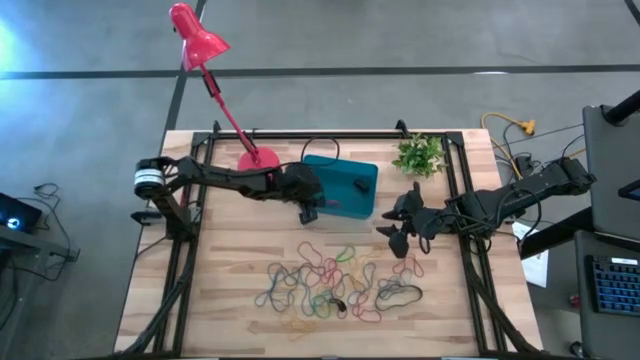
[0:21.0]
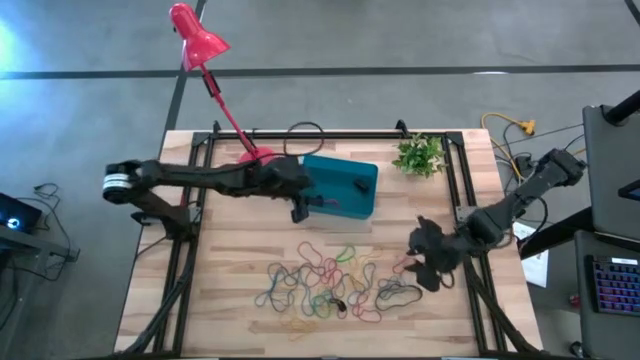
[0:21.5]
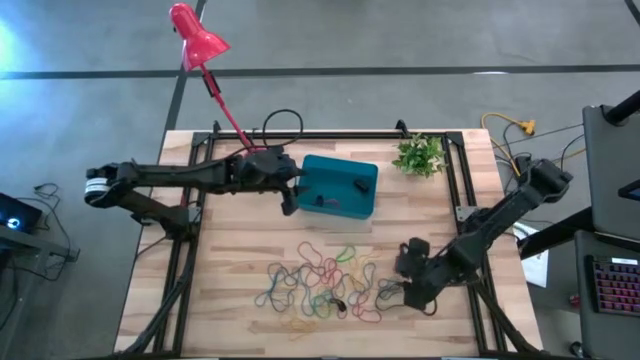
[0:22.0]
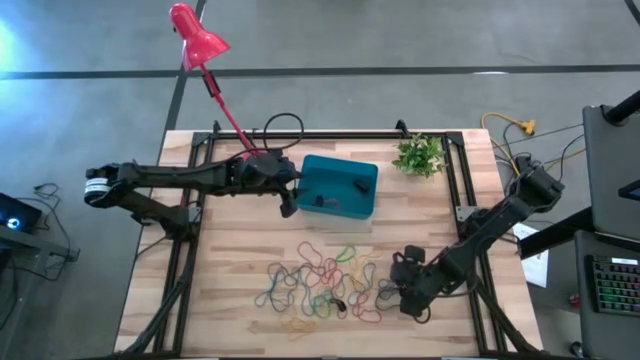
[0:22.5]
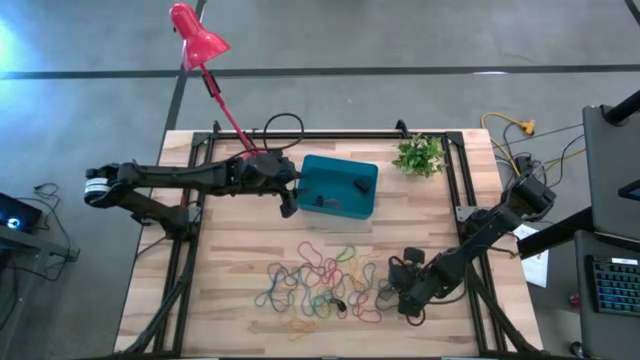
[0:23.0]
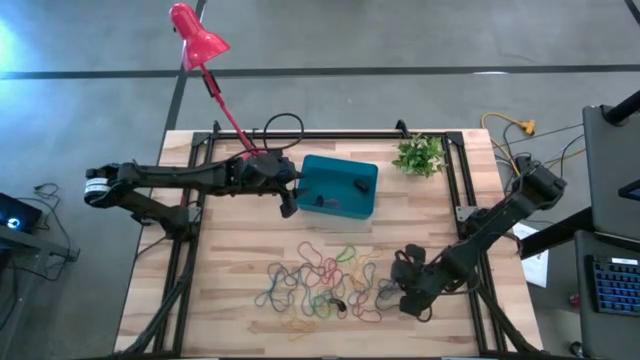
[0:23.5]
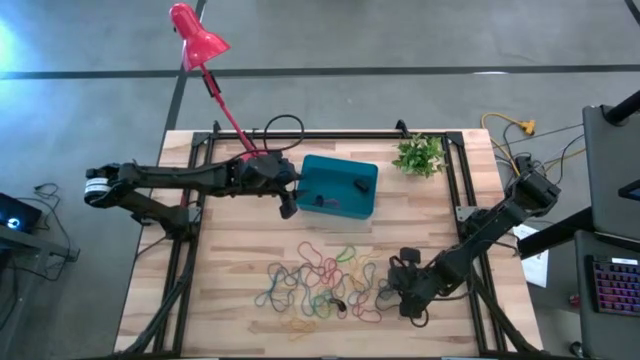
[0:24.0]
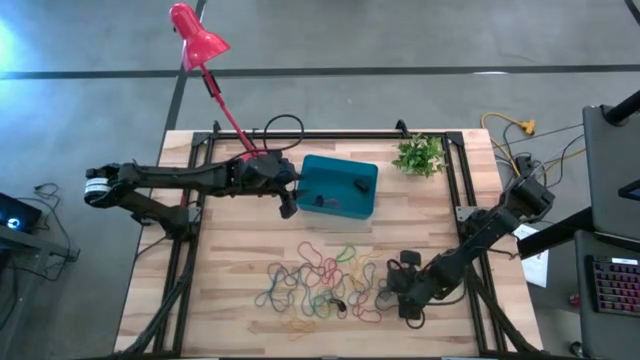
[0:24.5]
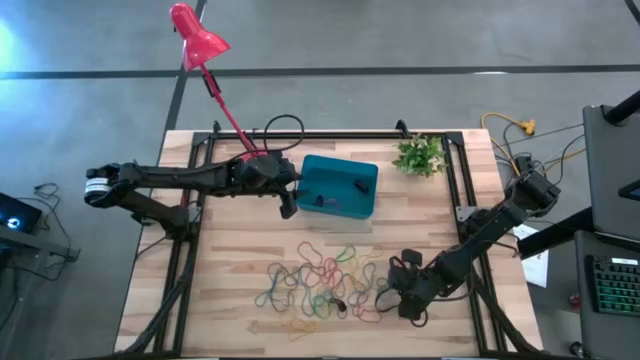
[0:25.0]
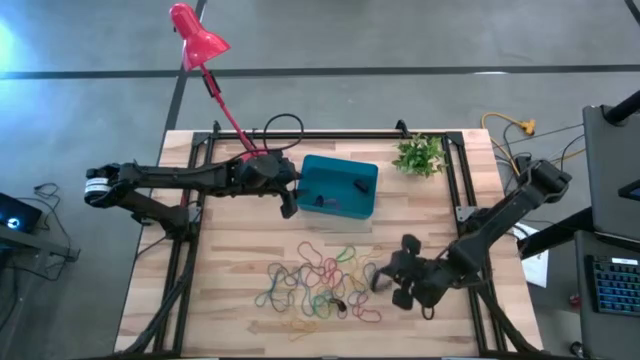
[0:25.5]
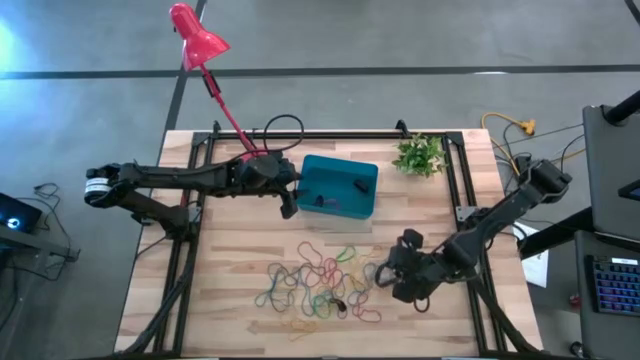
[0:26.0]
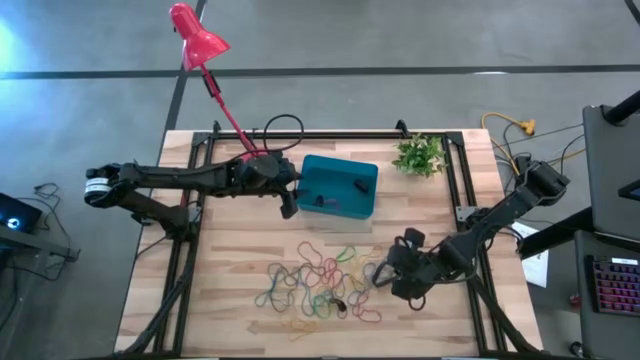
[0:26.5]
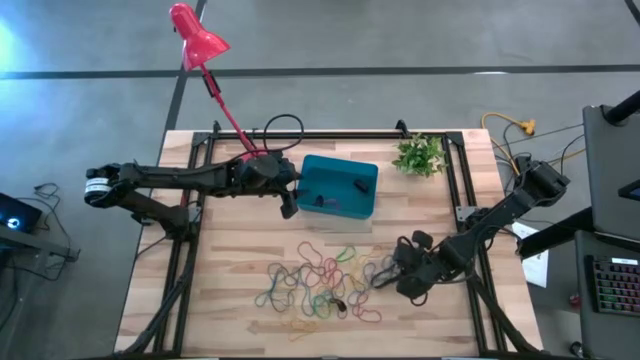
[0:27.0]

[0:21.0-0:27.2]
Task: Pick and place rubber bands into bin
Put the black rubber band into the blue bin

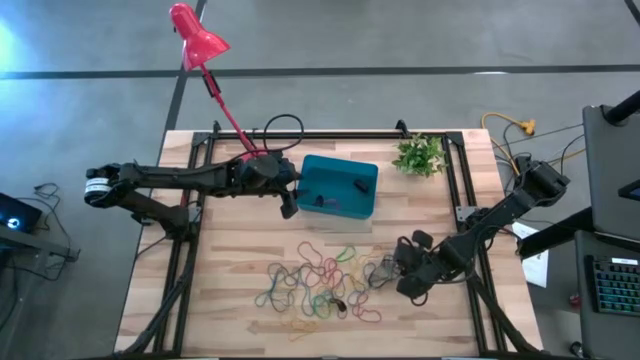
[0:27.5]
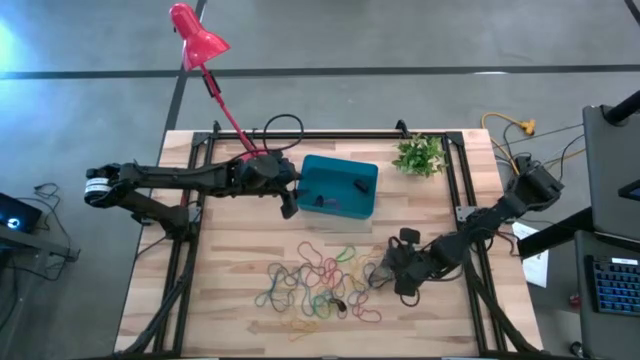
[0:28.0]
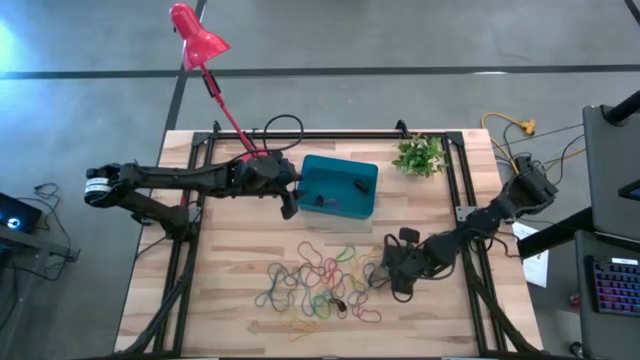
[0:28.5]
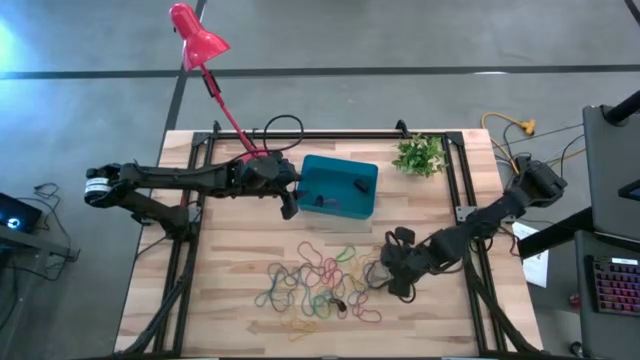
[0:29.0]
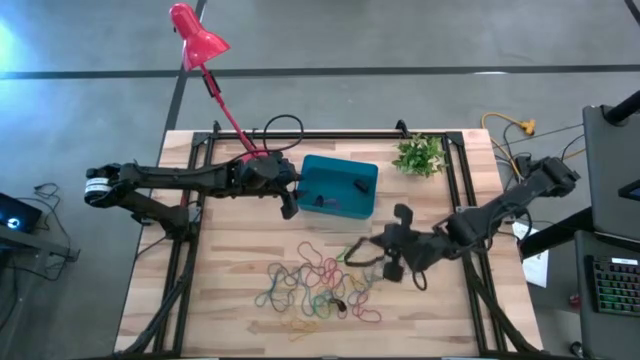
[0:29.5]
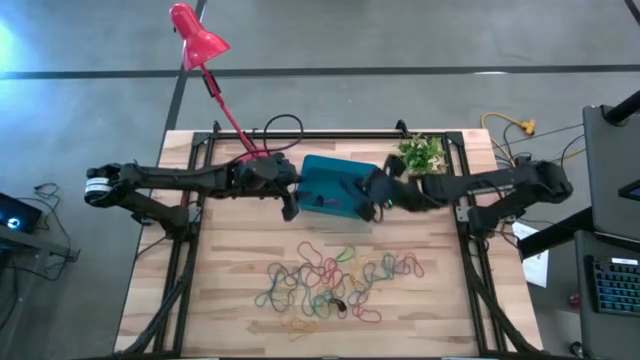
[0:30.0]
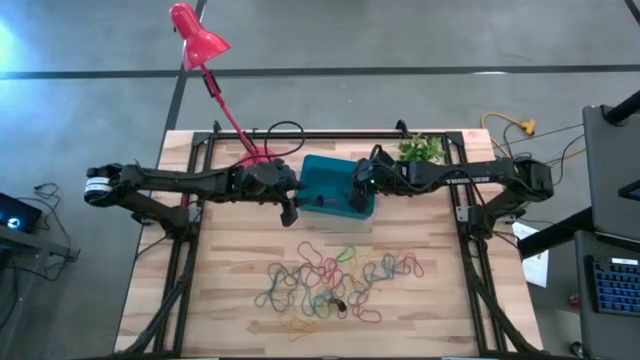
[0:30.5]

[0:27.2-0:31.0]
Put the black rubber band into the blue bin

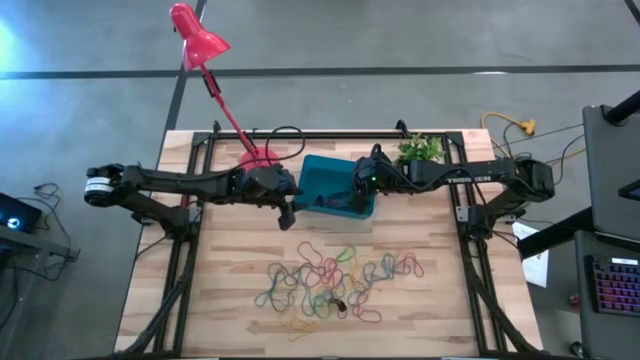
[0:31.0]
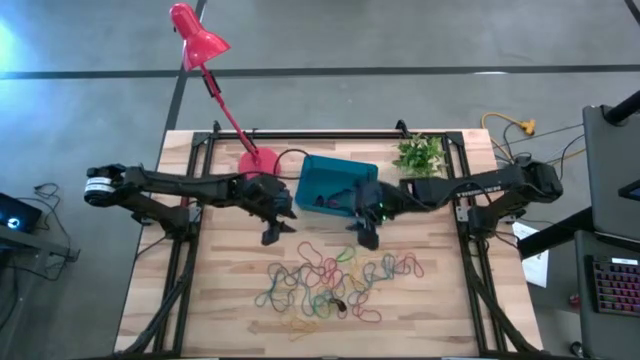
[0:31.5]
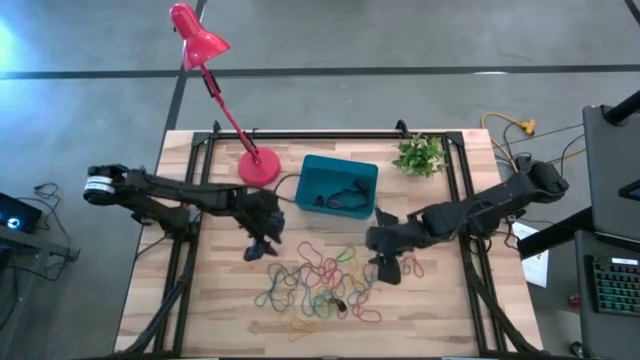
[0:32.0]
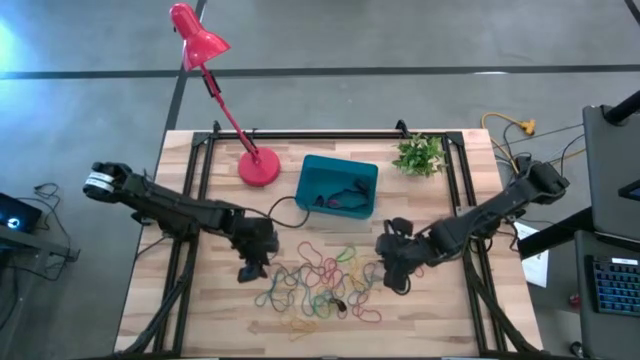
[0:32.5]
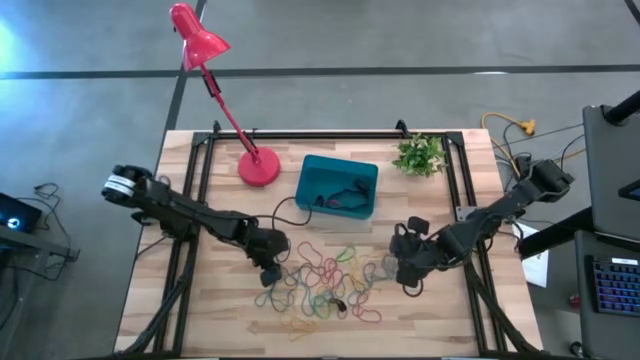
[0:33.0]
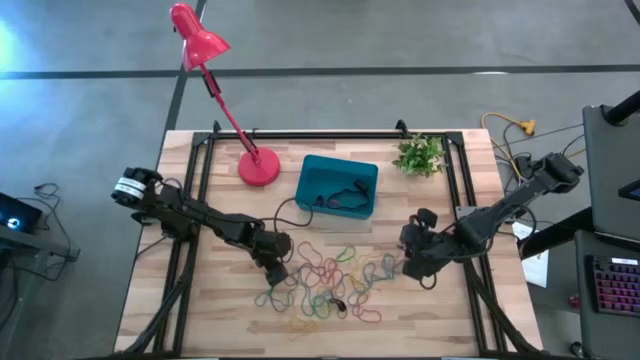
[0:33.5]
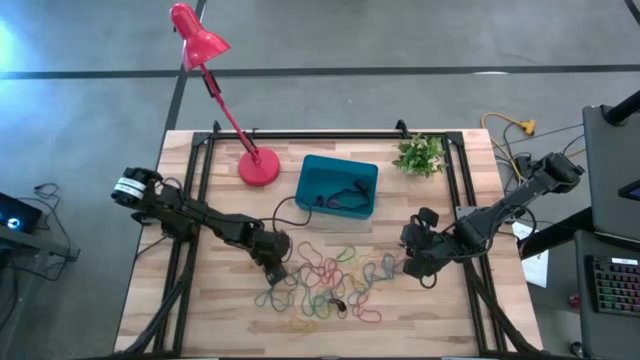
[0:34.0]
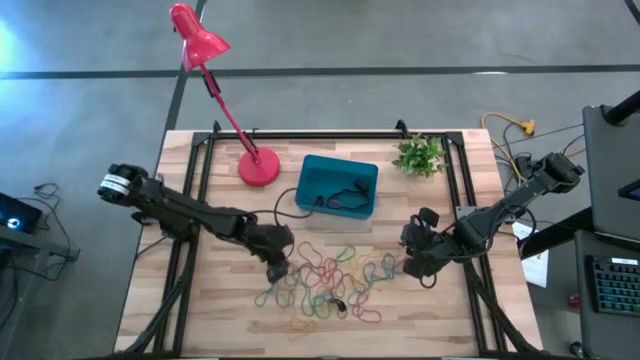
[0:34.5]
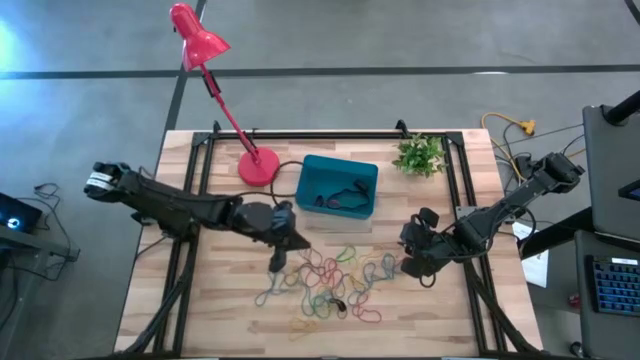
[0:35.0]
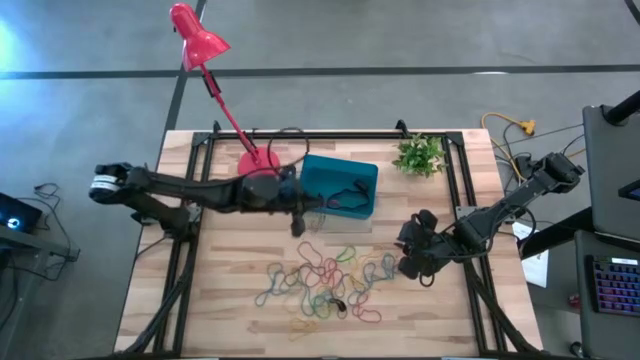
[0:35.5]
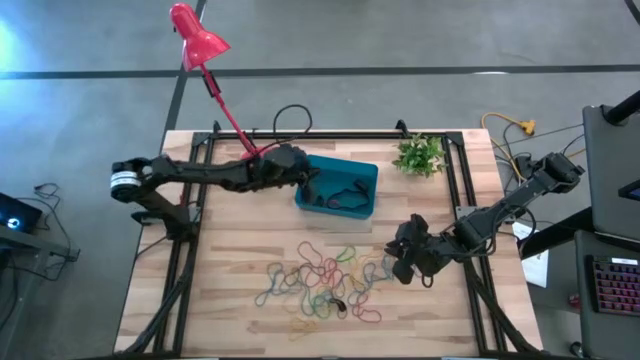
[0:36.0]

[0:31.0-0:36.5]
Put the purple rubber band into the blue bin

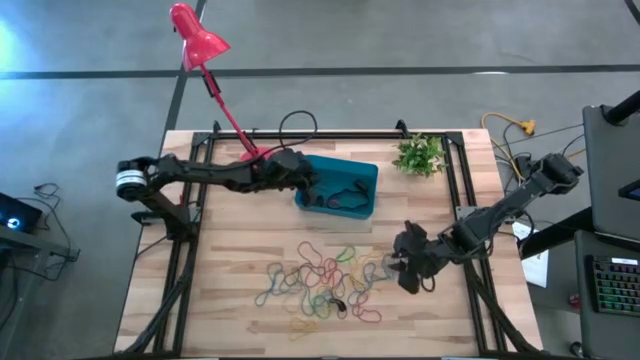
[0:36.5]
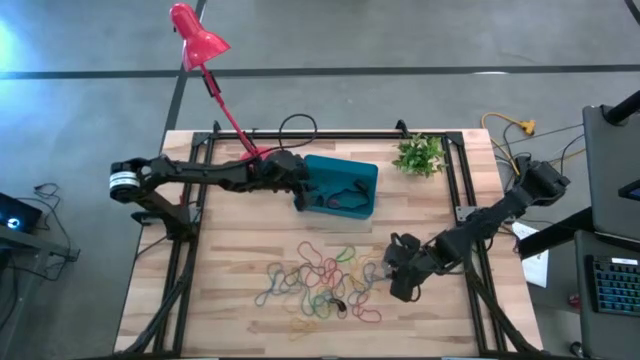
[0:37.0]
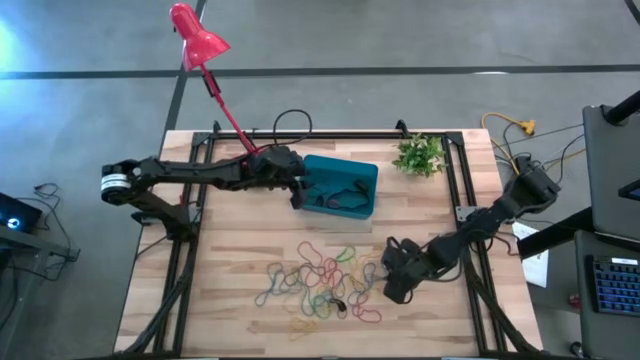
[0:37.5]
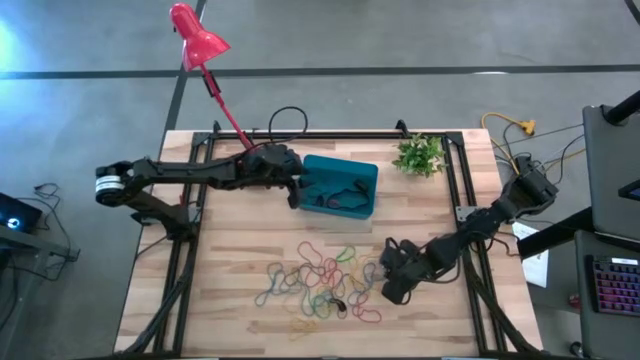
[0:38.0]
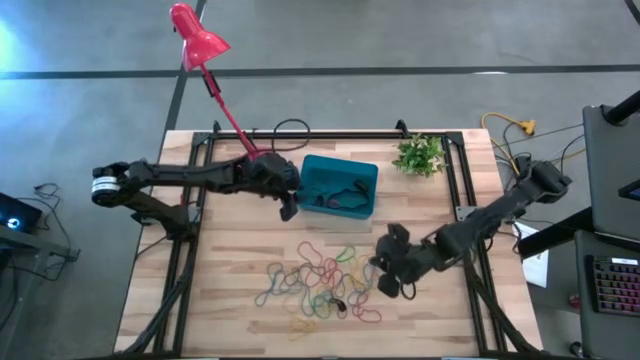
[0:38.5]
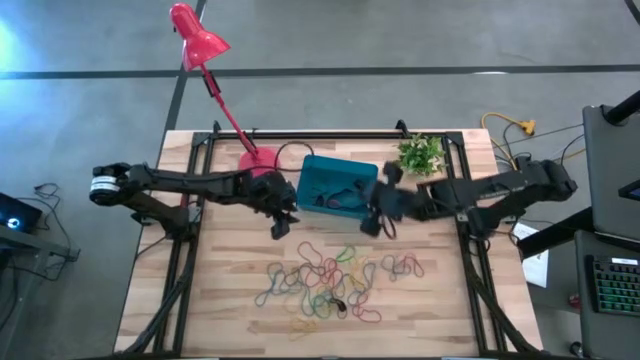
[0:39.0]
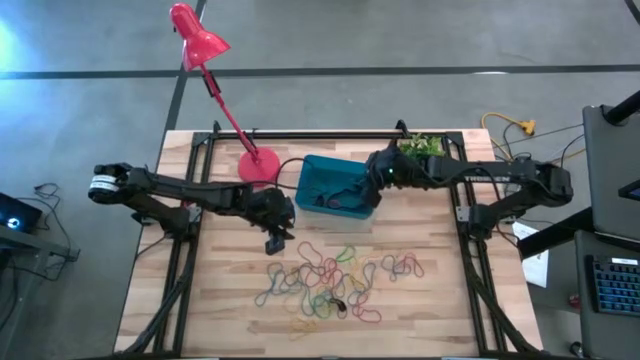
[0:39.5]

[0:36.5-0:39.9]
Put the blue rubber band into the blue bin

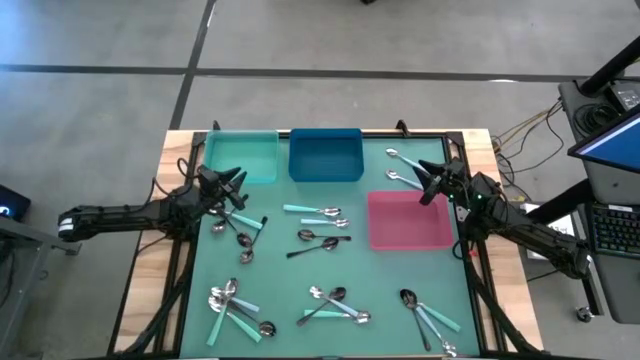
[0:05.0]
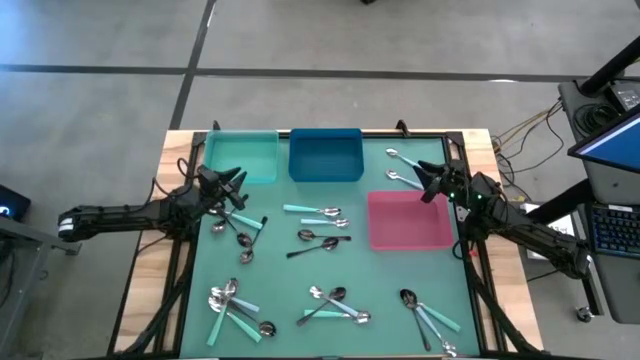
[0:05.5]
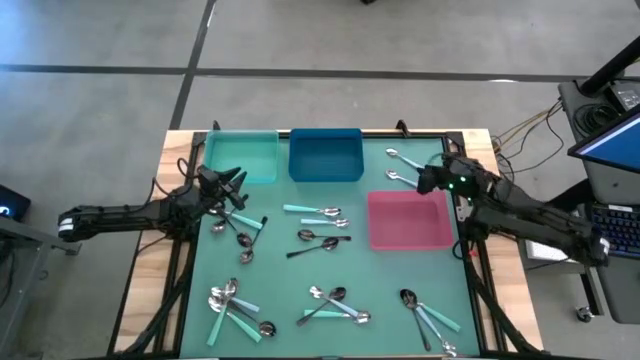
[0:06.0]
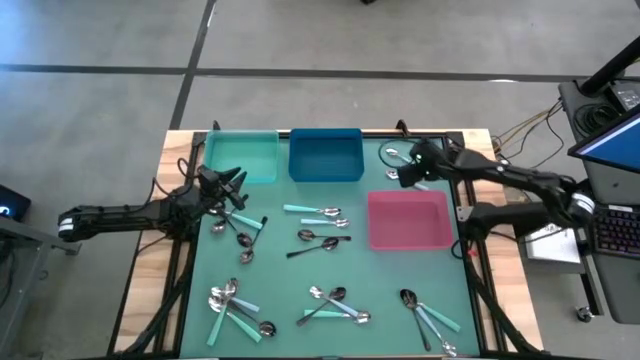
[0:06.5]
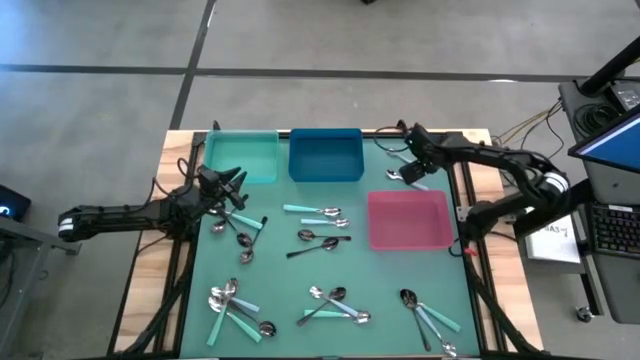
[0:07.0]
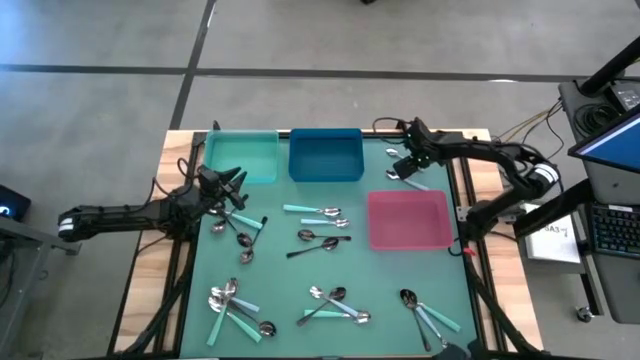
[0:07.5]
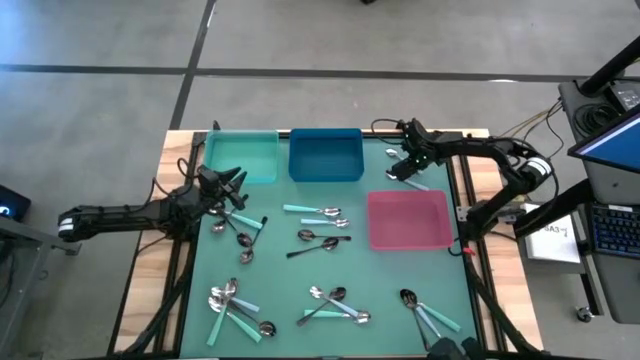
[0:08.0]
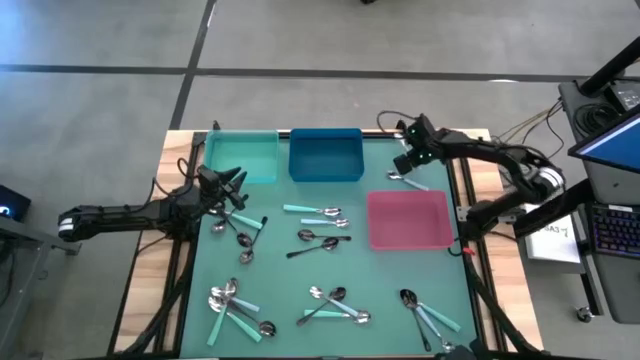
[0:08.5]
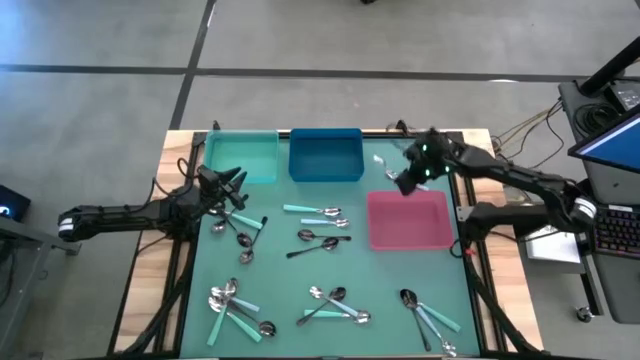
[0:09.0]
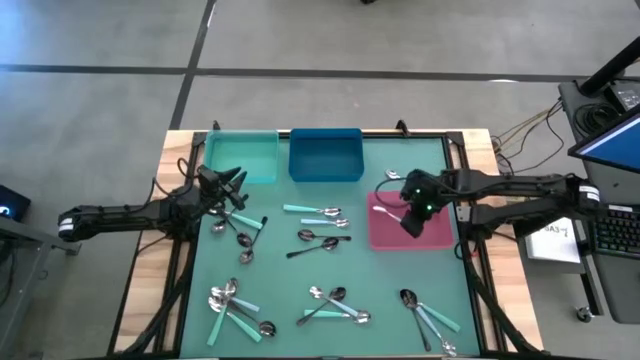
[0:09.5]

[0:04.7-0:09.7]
Task: Sort silverware by color (type)
Put the blue spoon into the red bin
